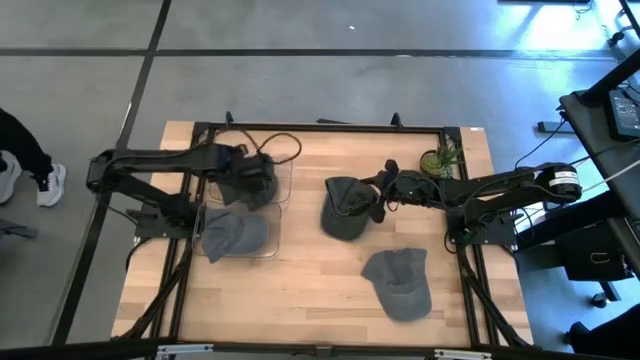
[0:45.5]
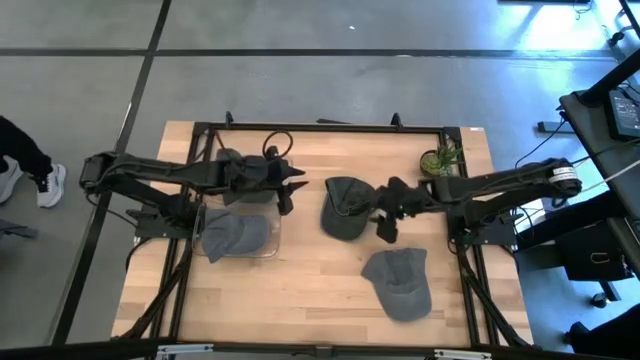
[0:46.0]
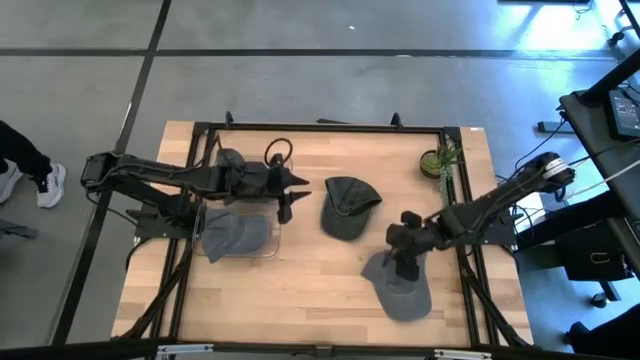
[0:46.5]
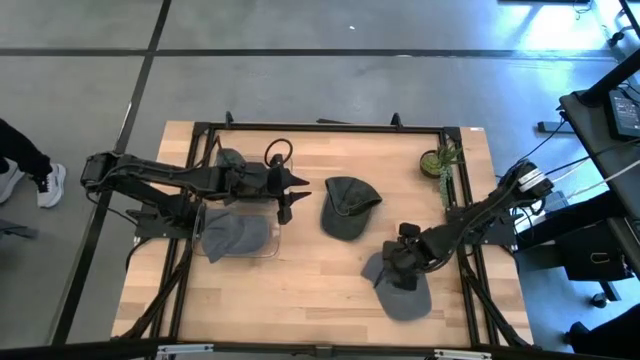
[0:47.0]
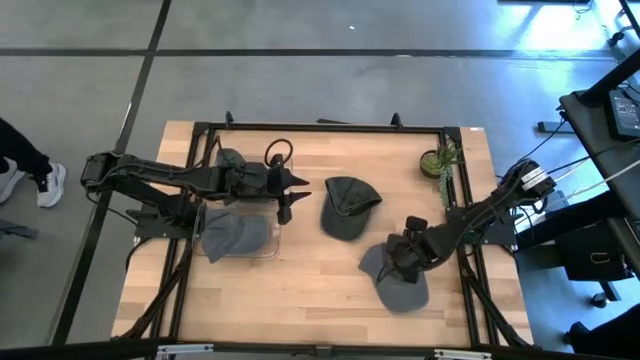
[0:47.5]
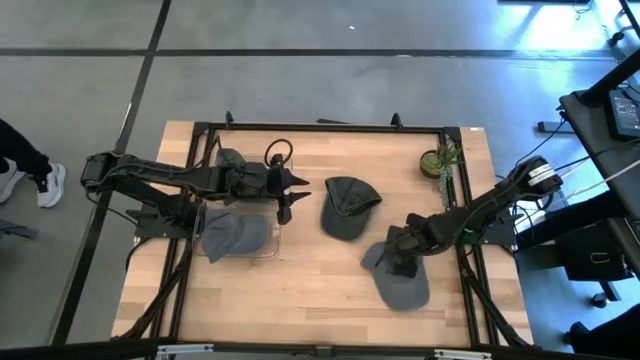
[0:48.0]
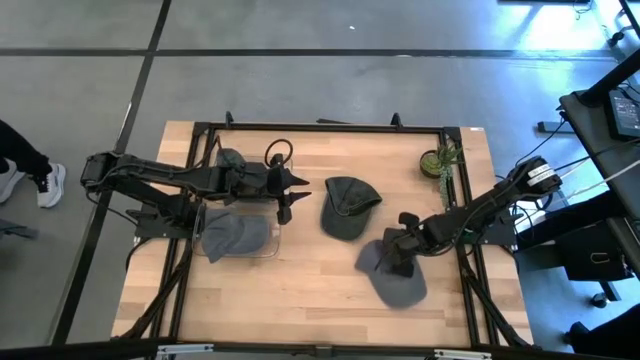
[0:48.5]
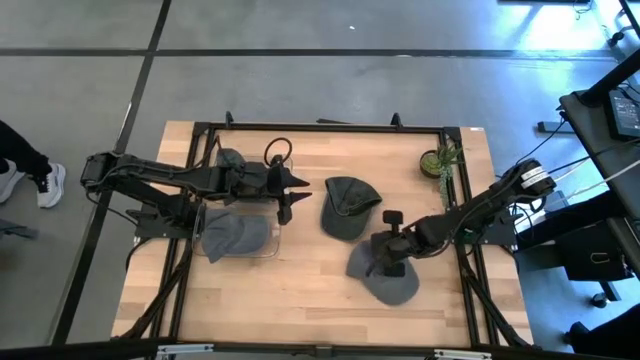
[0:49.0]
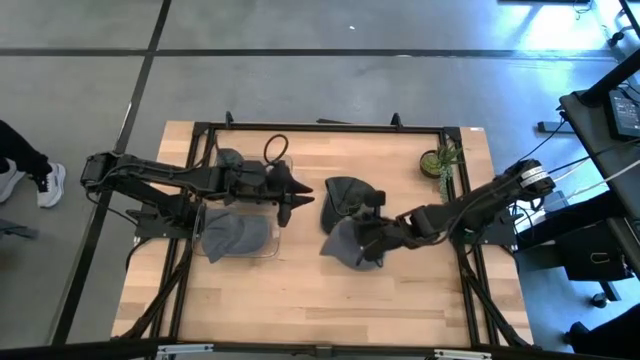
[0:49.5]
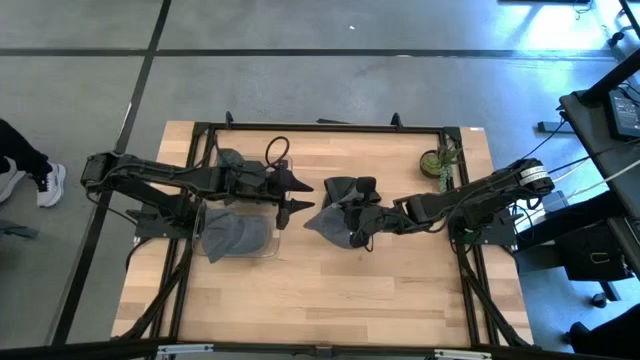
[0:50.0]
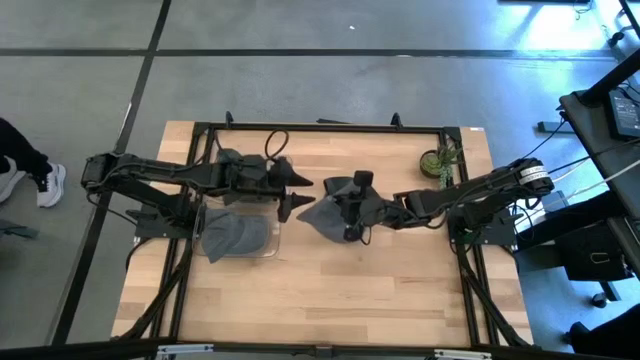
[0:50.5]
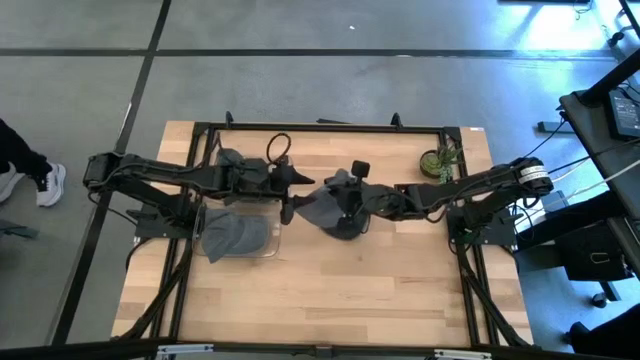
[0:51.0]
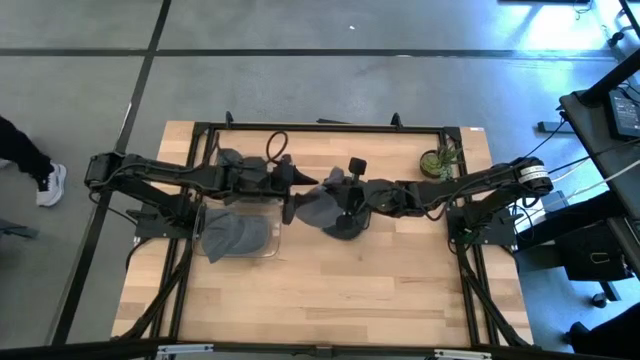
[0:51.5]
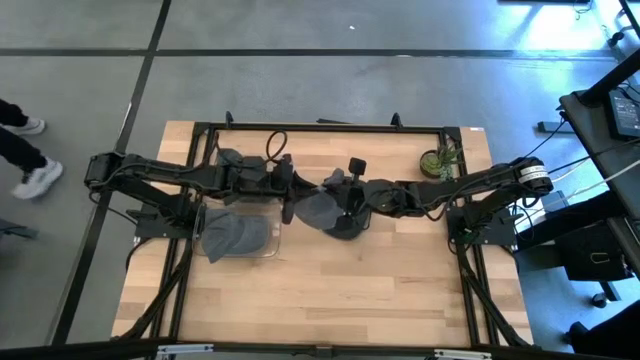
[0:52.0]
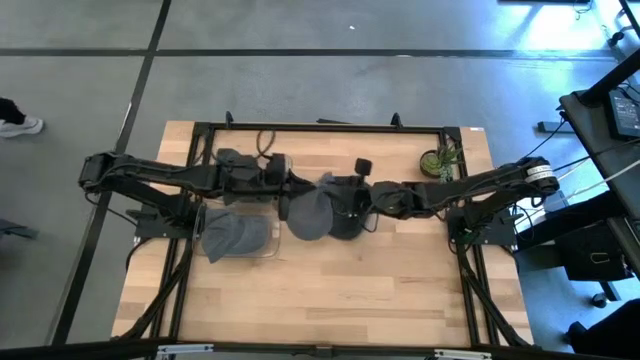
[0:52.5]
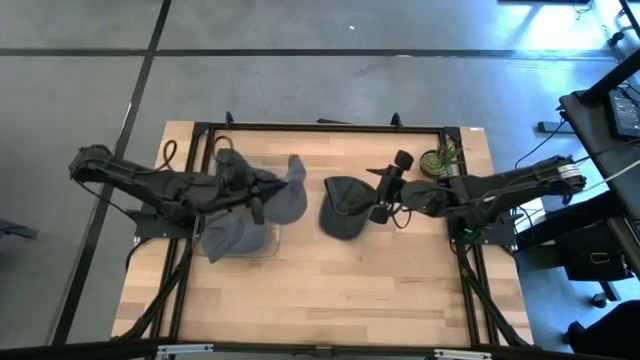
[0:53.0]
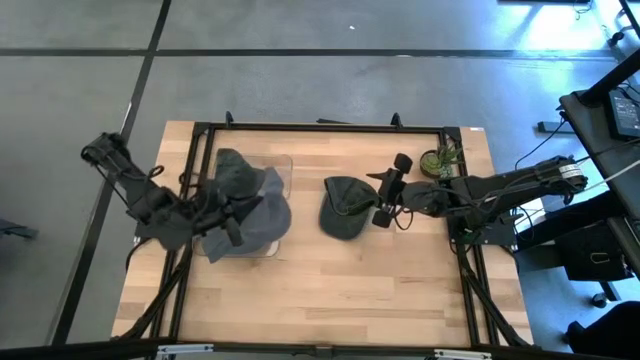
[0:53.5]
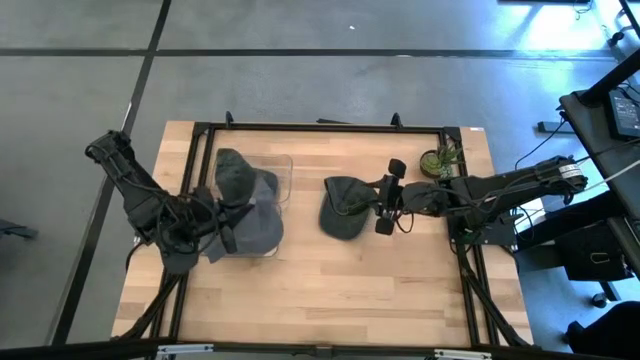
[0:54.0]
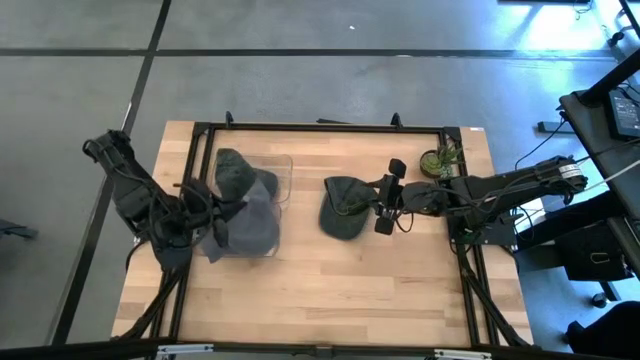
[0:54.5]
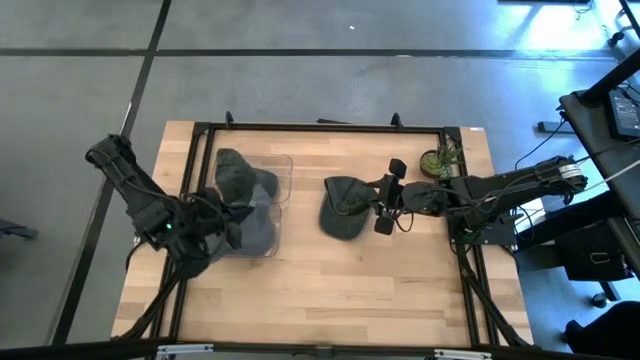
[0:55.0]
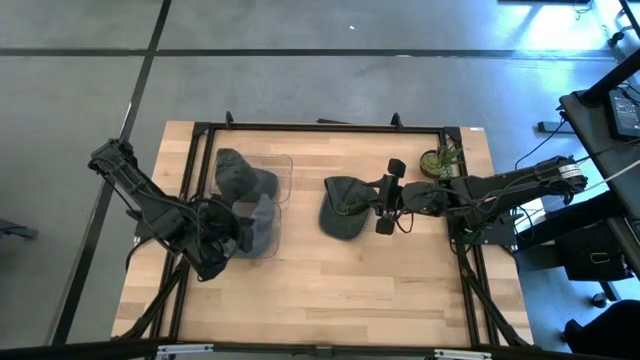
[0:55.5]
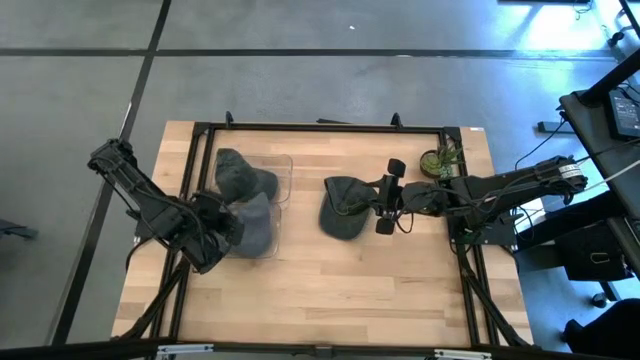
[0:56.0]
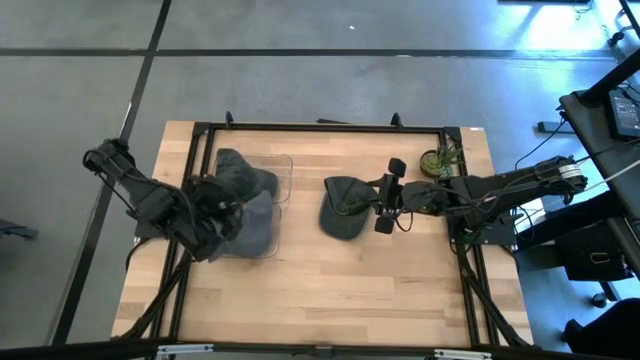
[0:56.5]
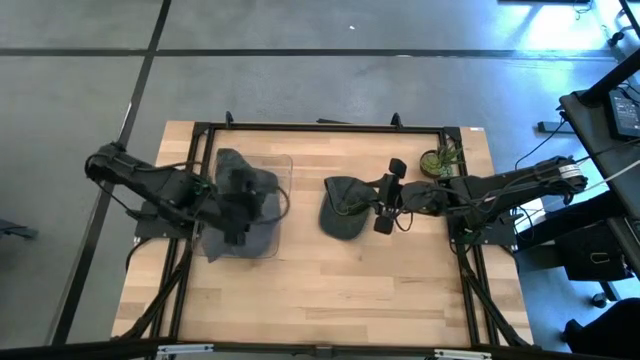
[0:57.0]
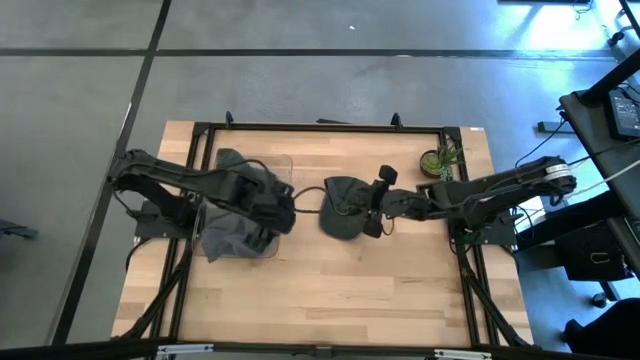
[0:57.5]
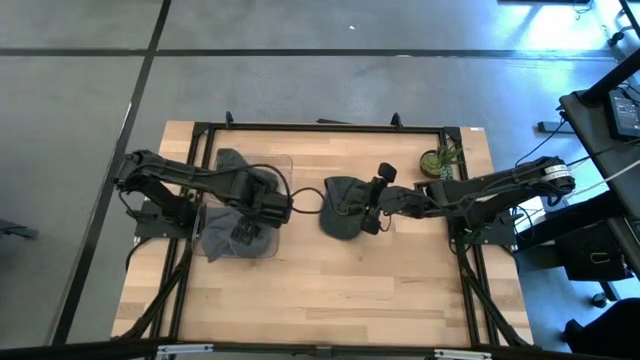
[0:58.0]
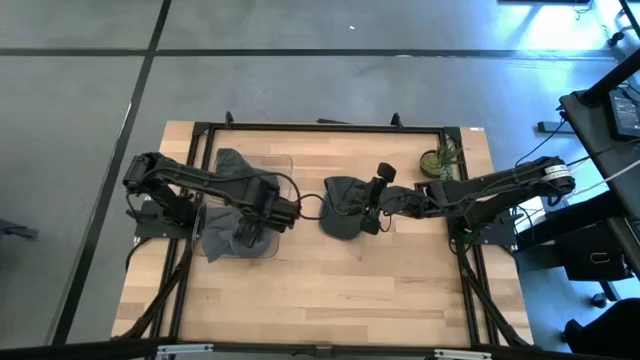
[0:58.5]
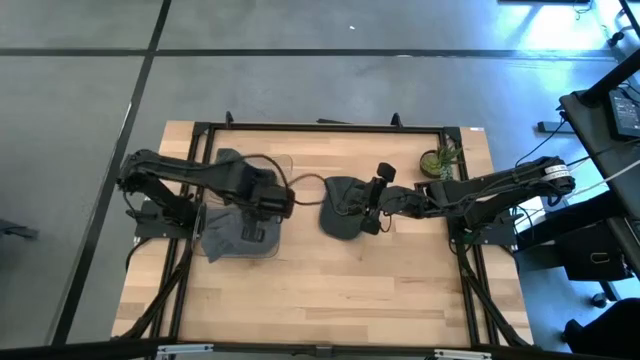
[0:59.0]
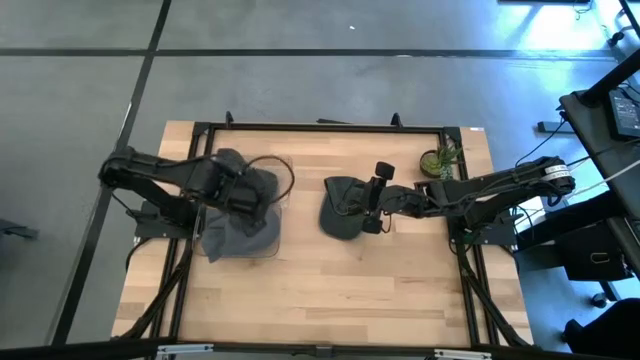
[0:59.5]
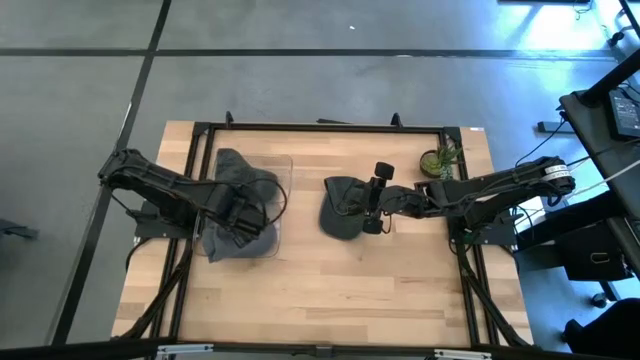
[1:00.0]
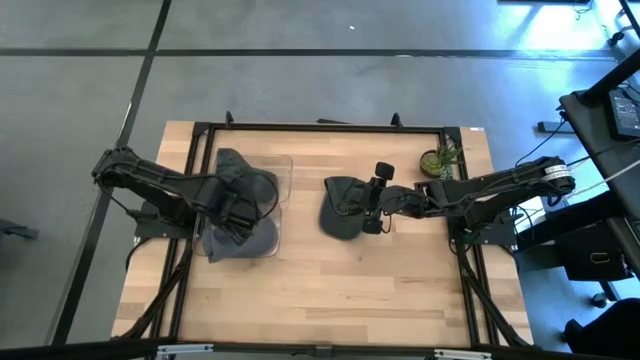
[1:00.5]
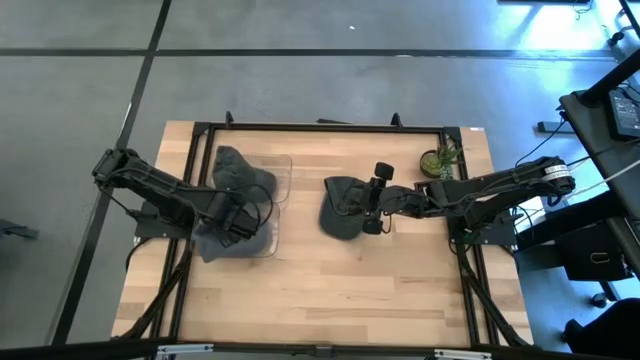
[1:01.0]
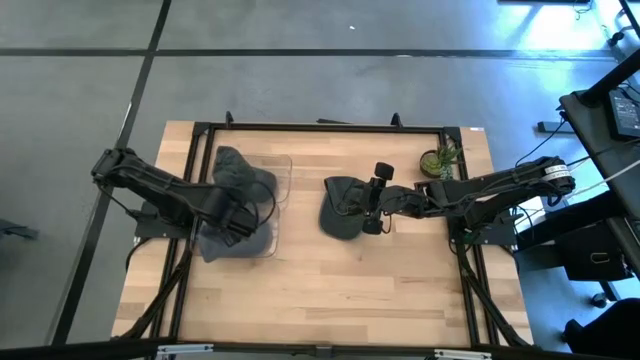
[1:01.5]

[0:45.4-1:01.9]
Task: Pick & Place hat
Put the gray cap into the bottom transparent bin

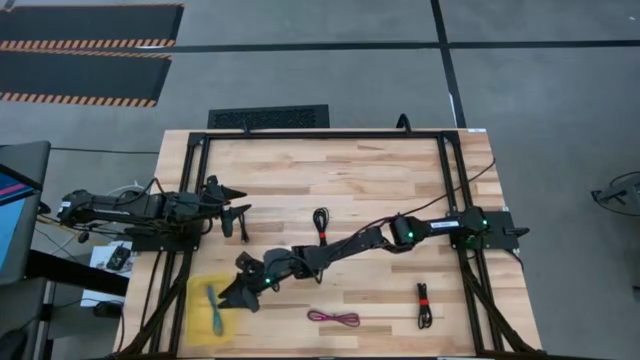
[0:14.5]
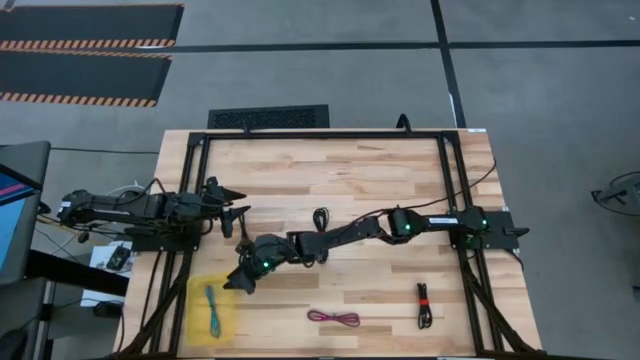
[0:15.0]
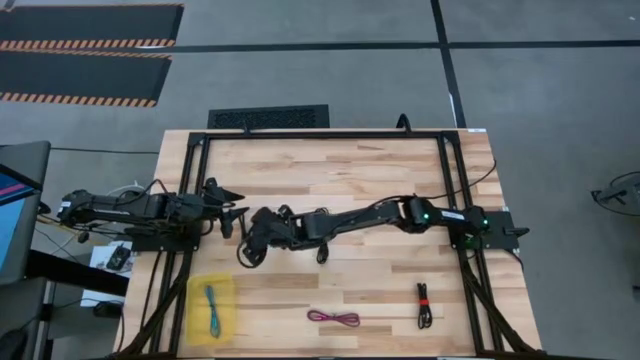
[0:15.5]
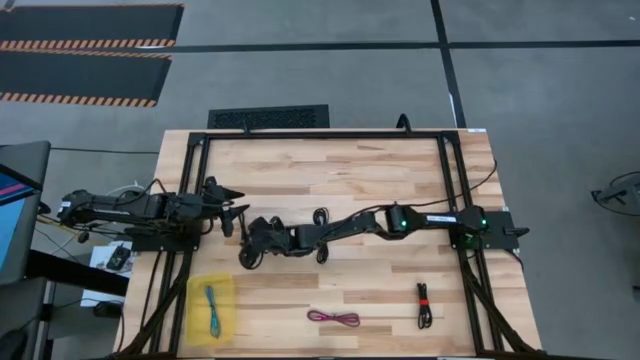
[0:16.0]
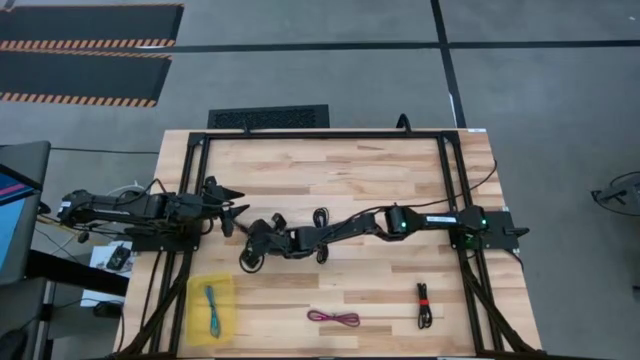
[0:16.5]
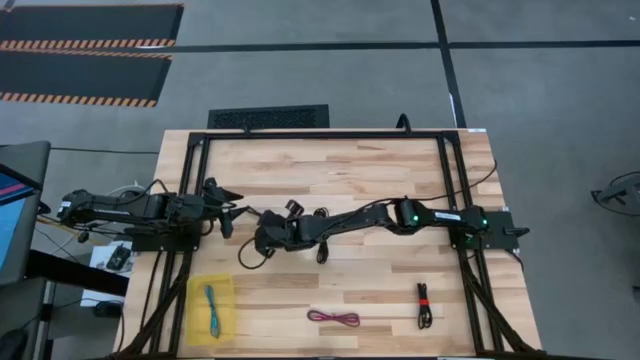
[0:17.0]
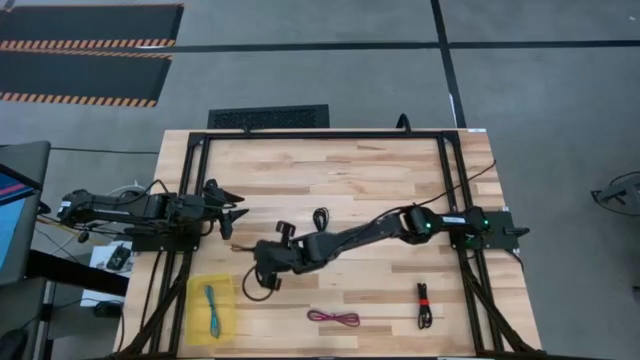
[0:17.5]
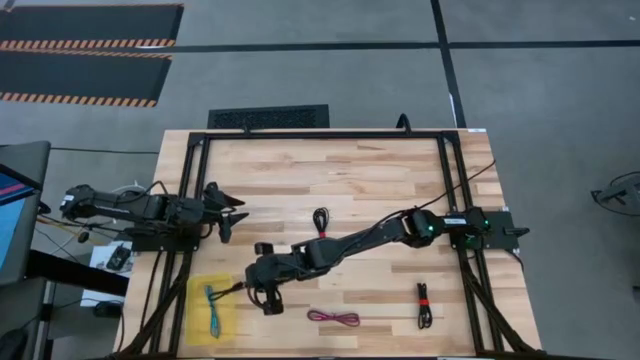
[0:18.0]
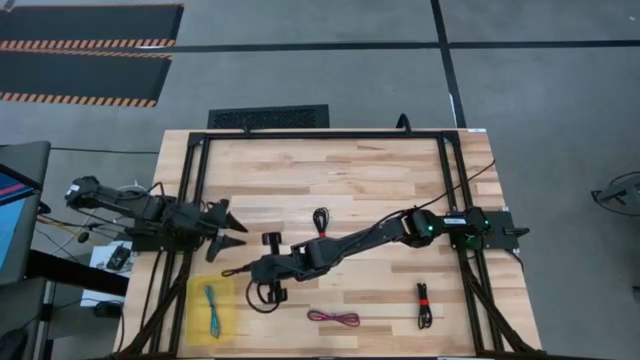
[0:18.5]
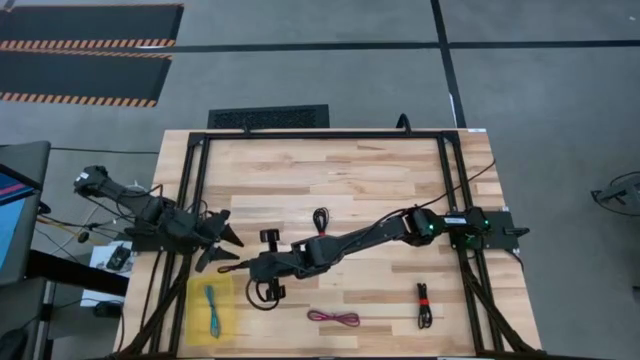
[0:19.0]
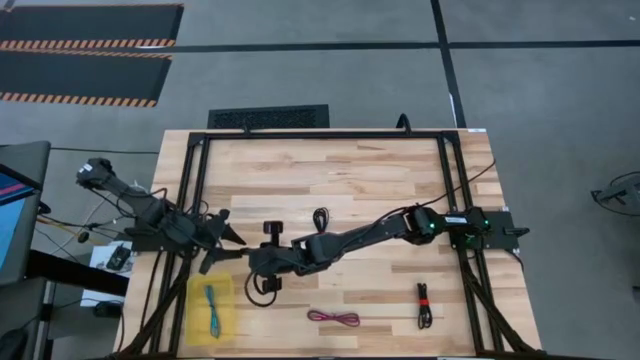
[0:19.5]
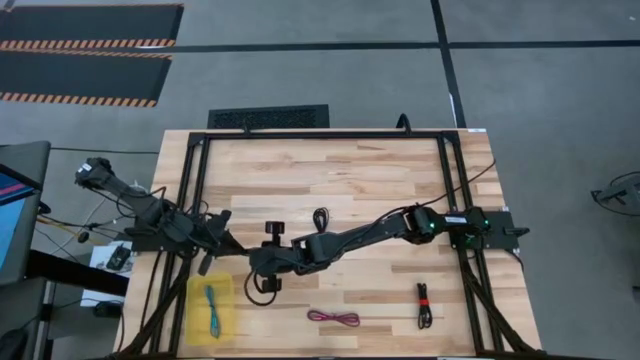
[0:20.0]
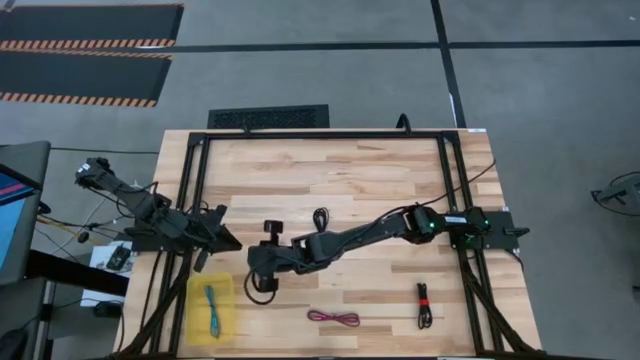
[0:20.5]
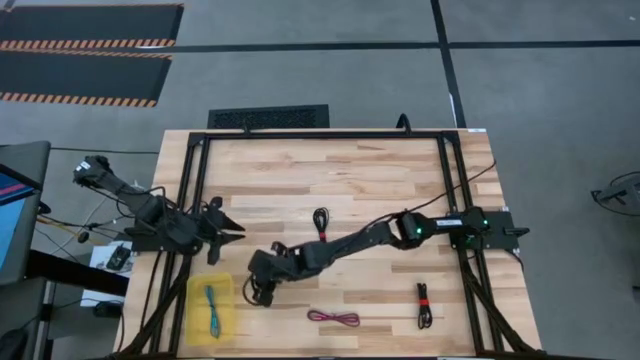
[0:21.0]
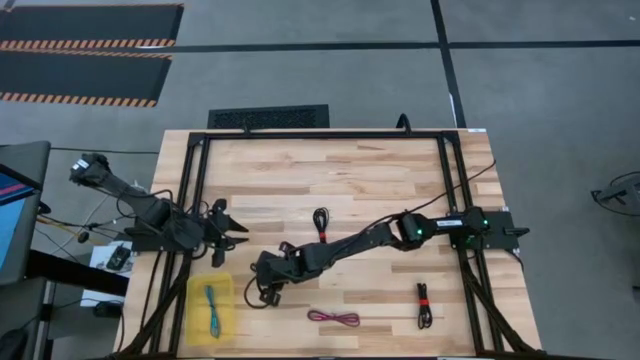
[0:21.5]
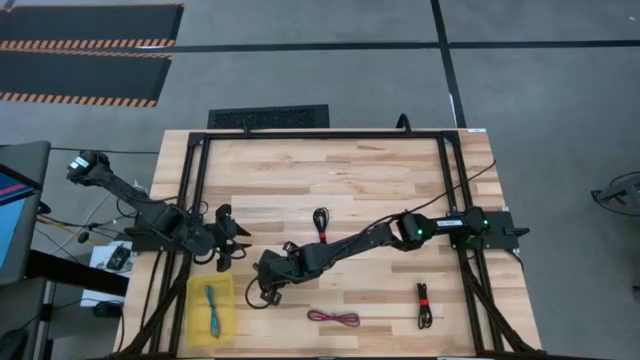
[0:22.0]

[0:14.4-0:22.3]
Task: Pick and place USB-C Cables
Put the top left black charger cable into the yellow bin
